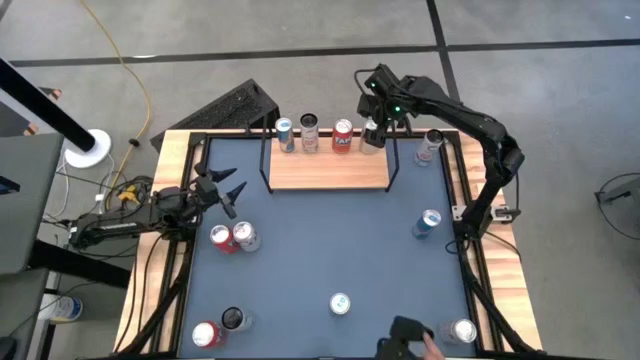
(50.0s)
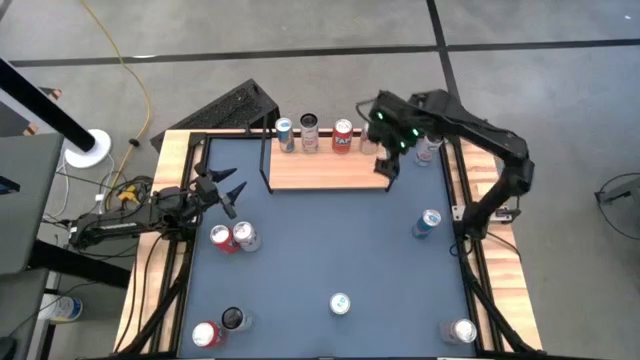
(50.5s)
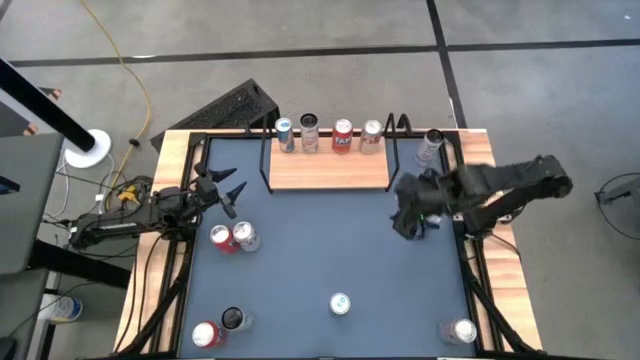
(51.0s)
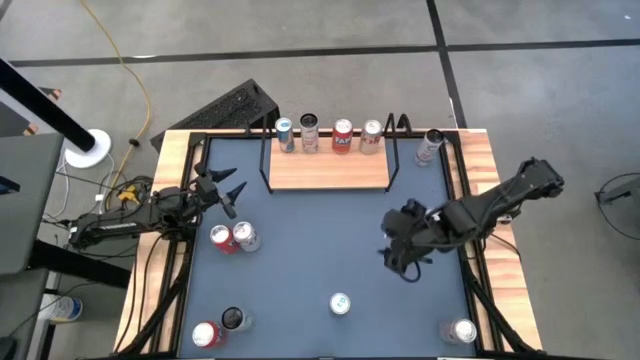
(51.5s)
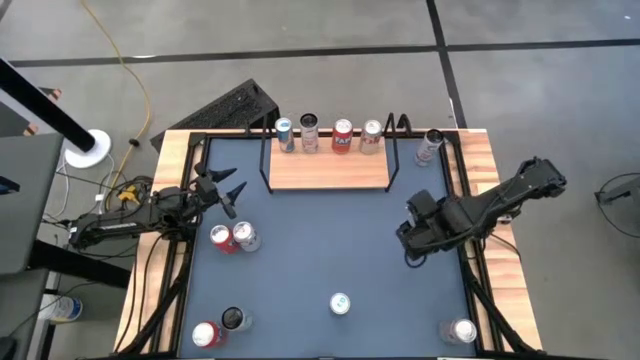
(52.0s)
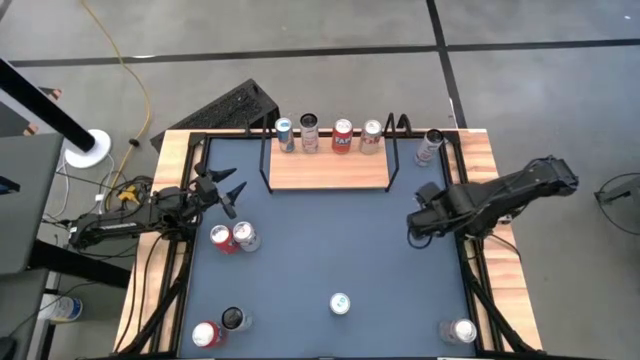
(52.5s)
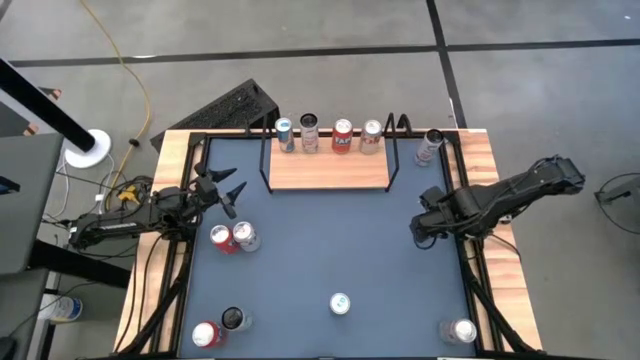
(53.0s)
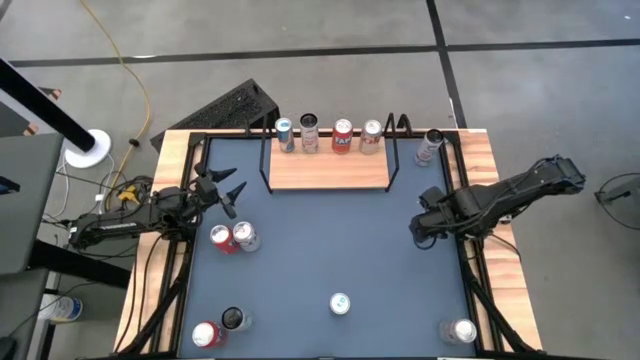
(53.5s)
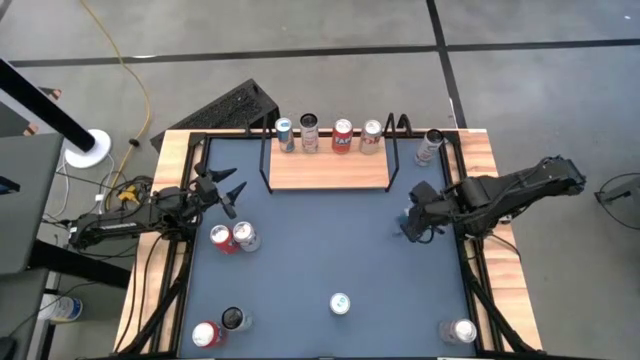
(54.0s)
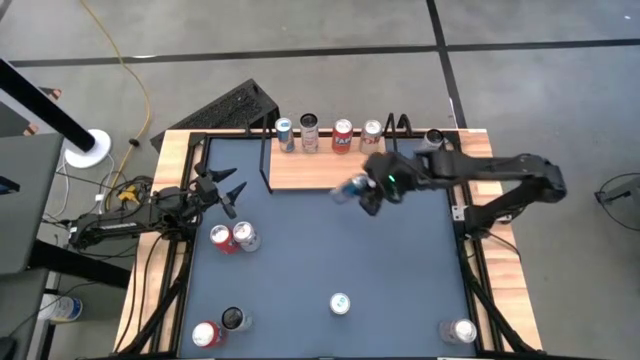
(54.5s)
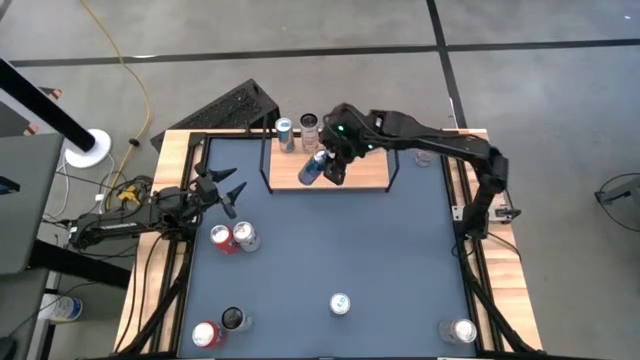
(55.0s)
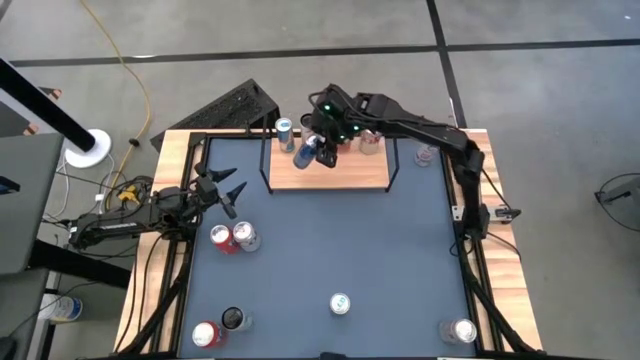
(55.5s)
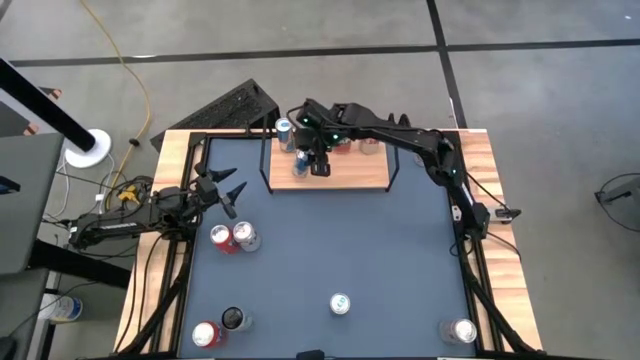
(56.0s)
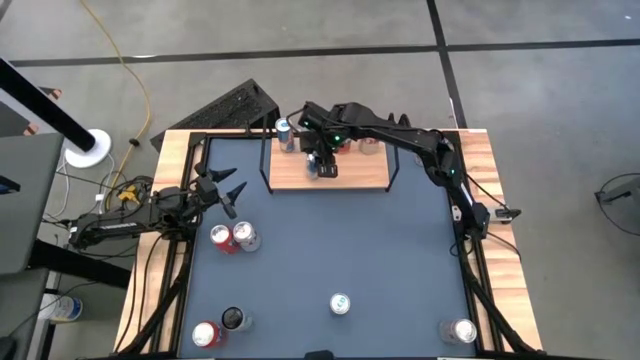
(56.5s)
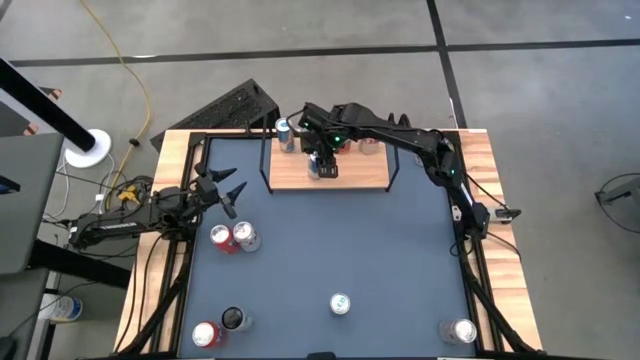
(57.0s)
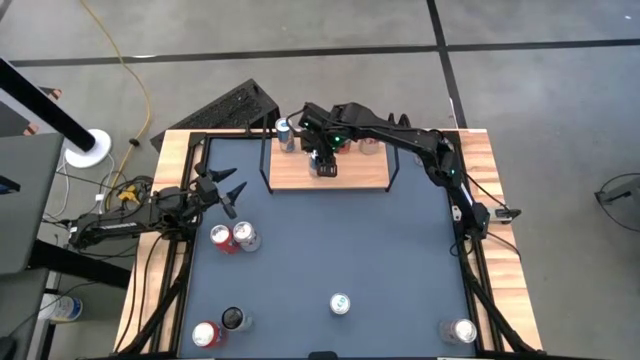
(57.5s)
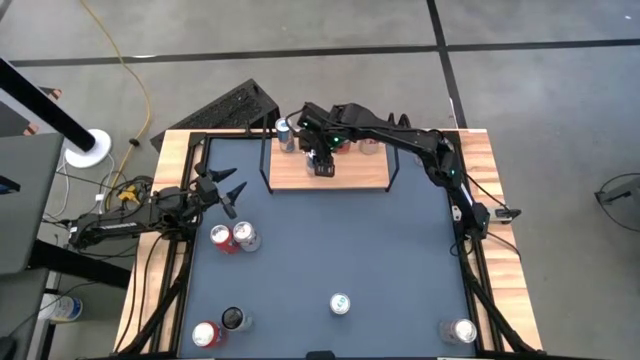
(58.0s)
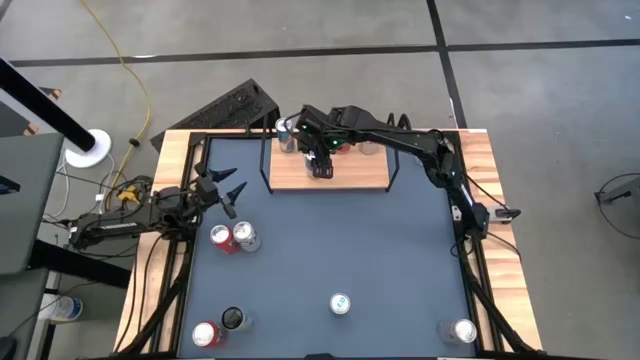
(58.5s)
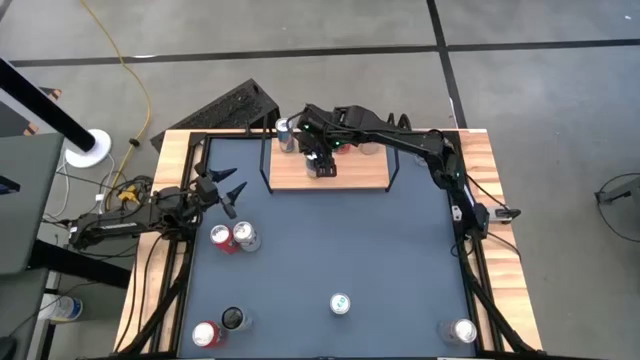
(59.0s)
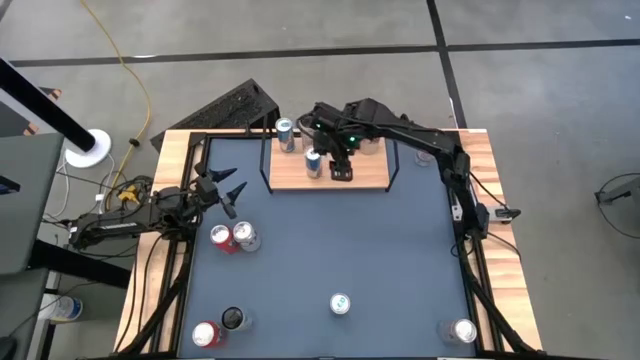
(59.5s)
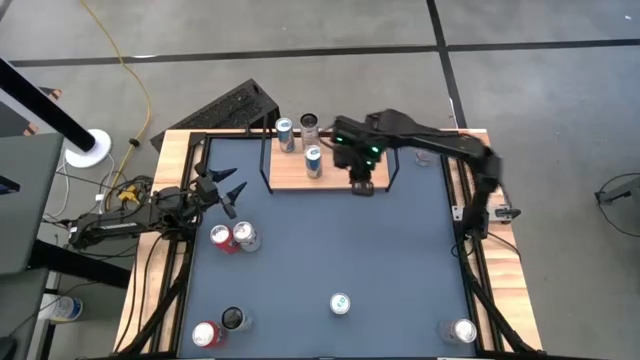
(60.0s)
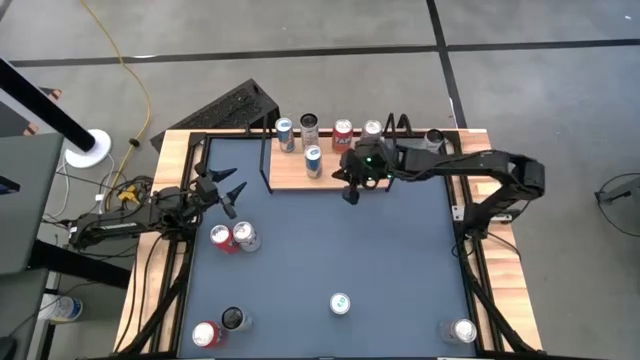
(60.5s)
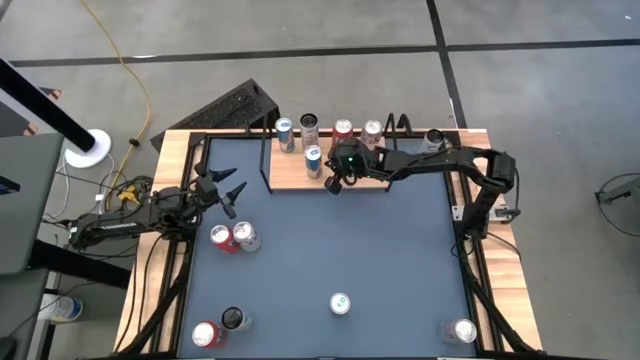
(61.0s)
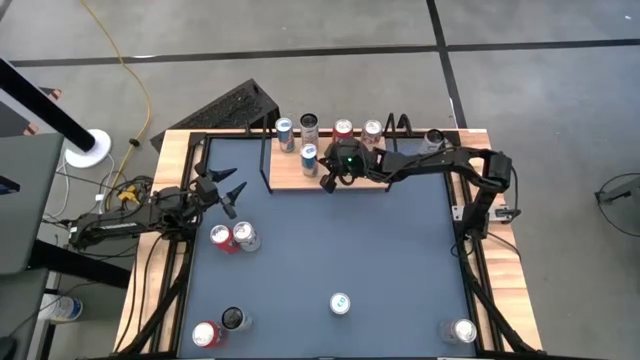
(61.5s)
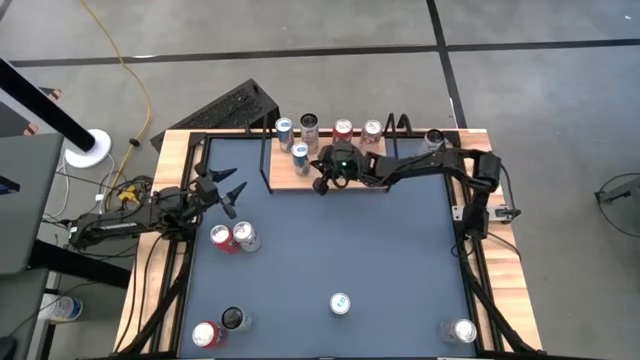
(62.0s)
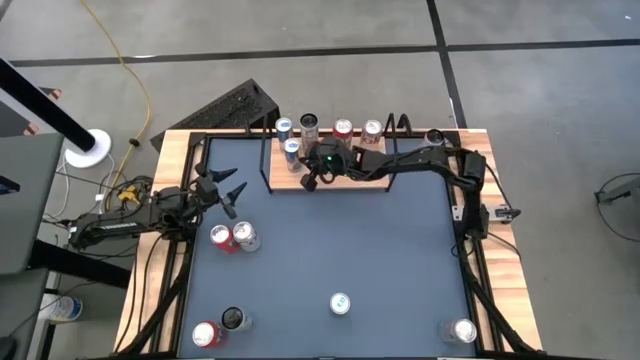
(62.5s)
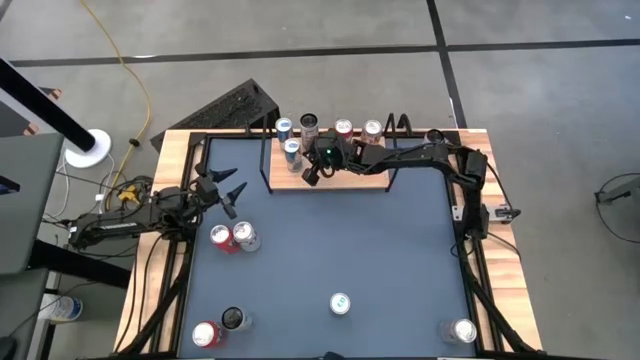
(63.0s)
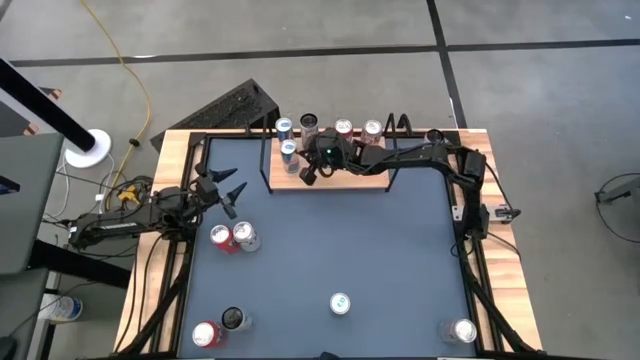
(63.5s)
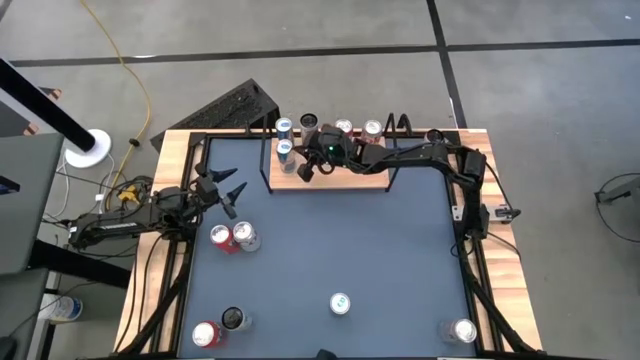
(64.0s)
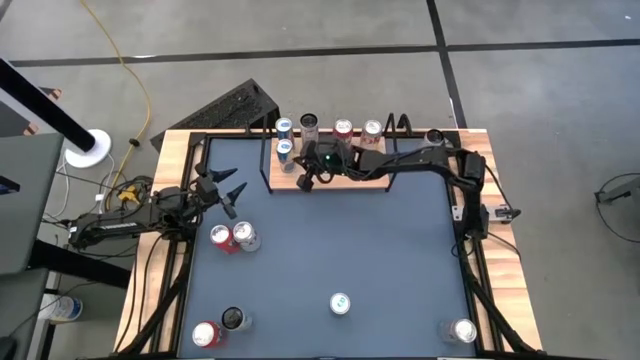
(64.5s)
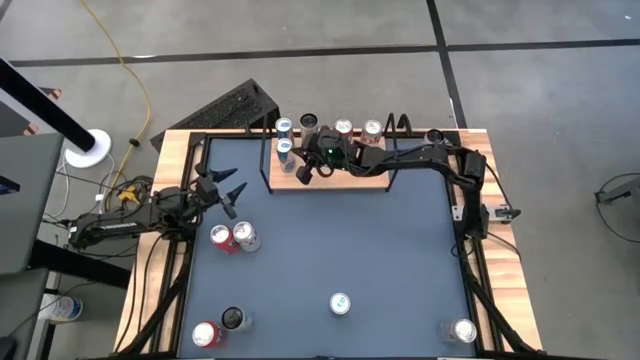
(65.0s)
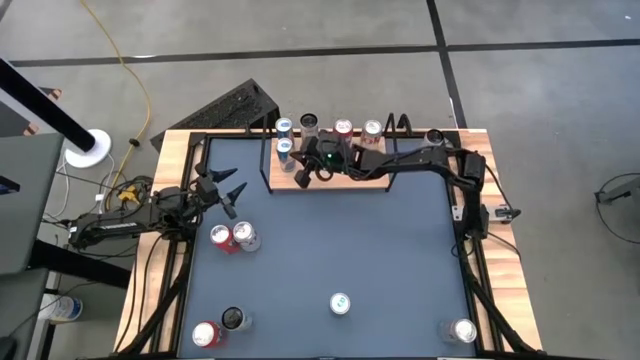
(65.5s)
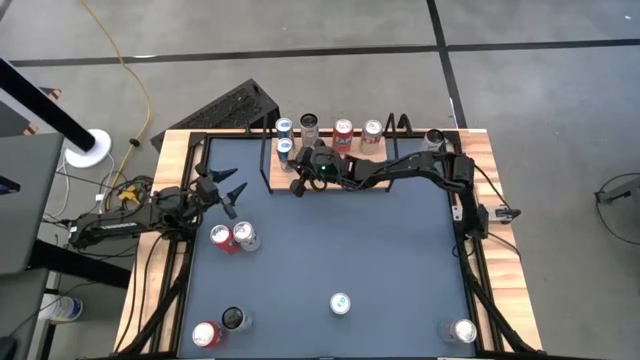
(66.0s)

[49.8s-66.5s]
Task: Place canned beverage on shelf
Put the top blue soda can on the shelf aligned with the other blue soda can

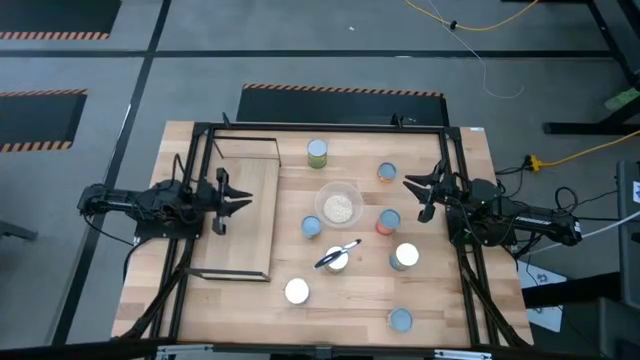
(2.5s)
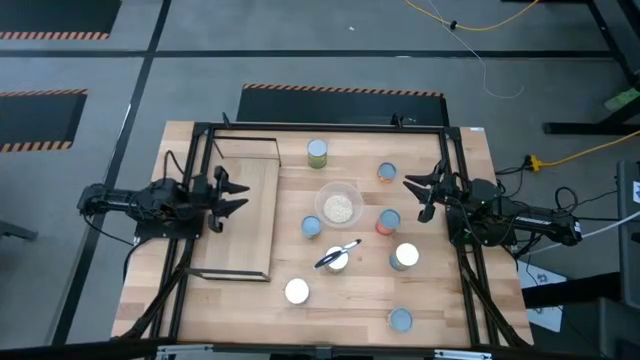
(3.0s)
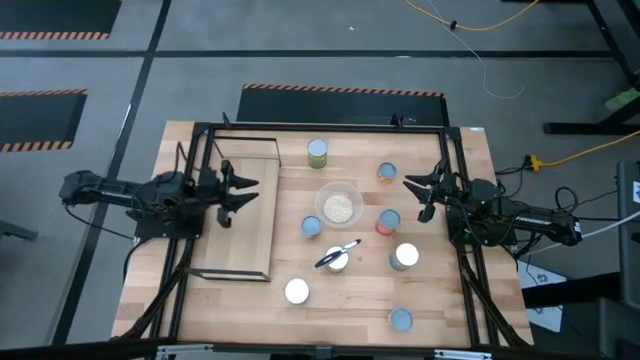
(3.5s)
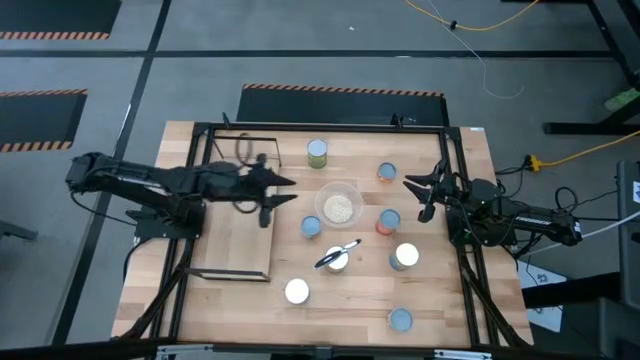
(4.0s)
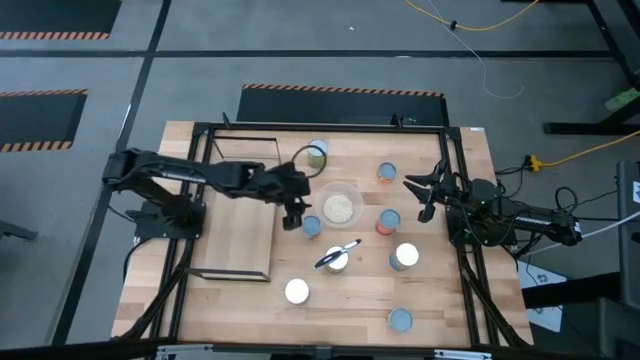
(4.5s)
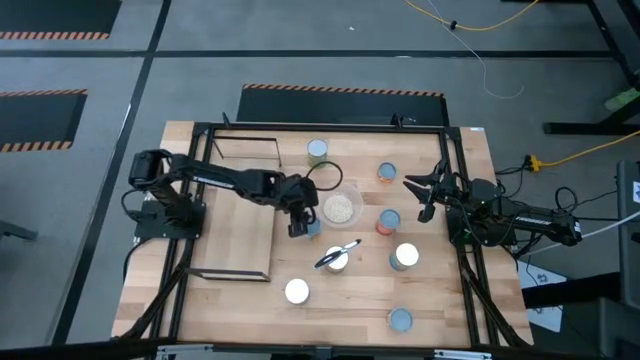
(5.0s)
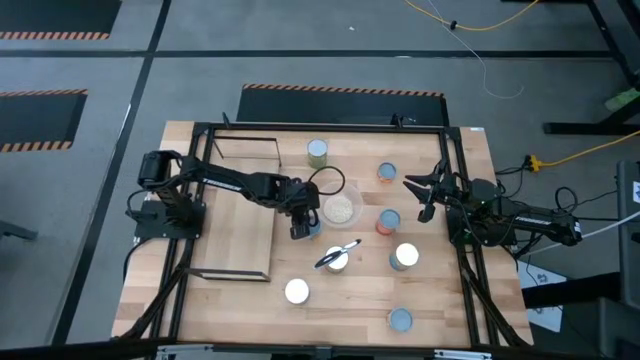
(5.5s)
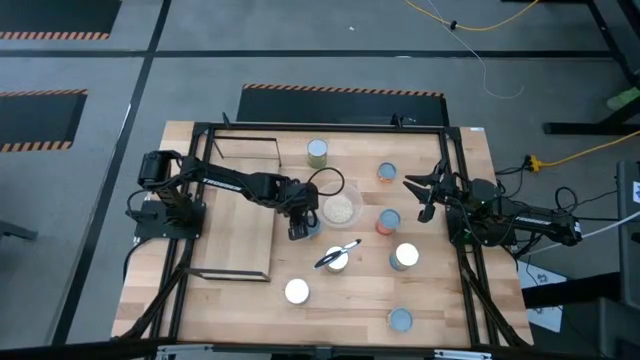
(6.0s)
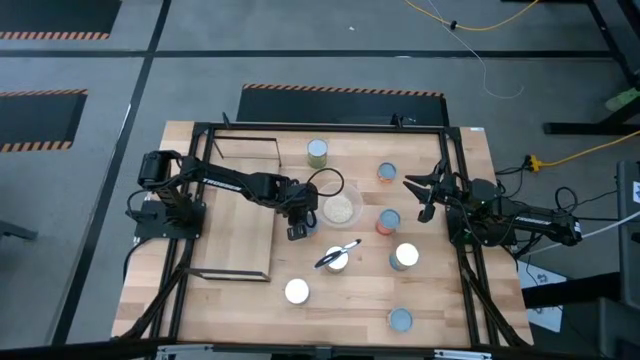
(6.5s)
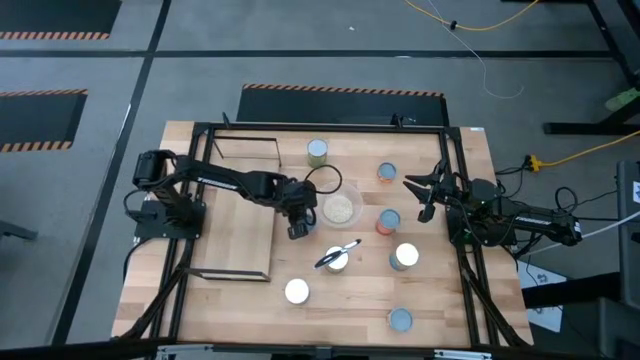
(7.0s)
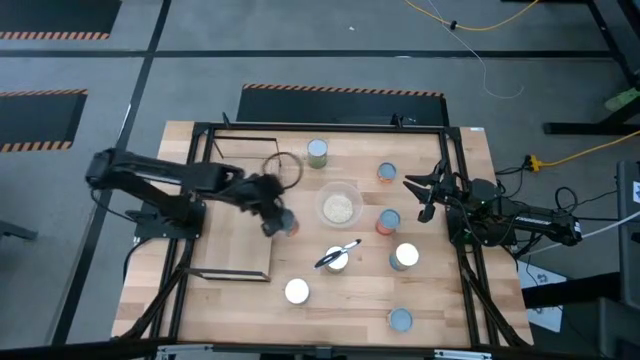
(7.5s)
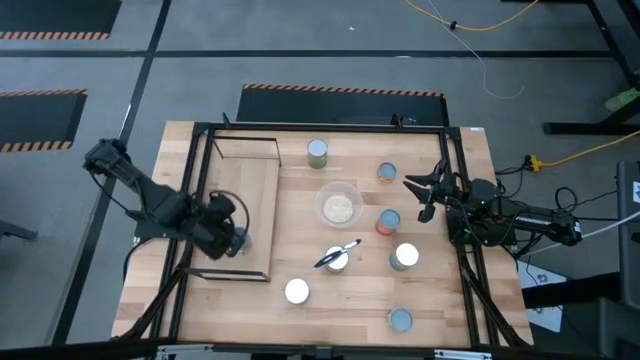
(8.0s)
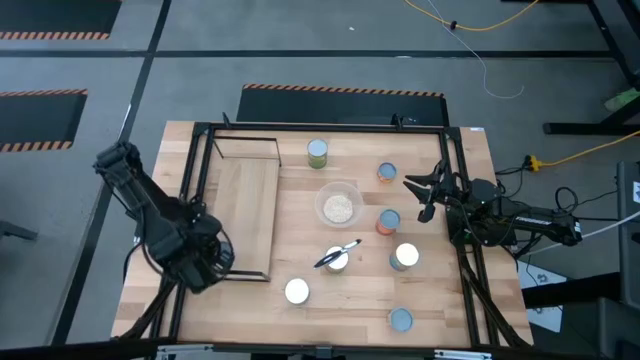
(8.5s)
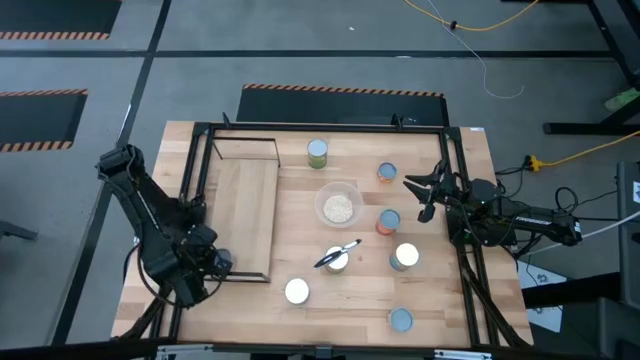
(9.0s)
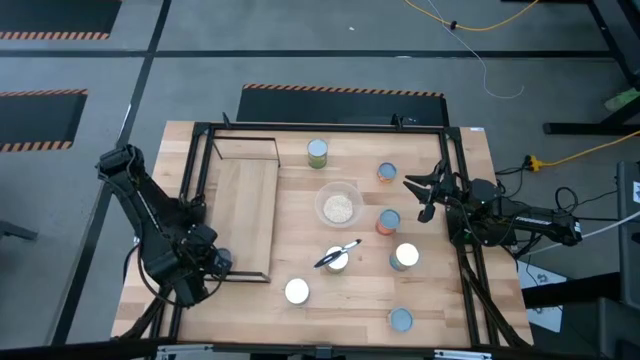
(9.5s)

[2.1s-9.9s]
Task: Pick and place cans onto a shelf
Put the canned oranges on the shelf
